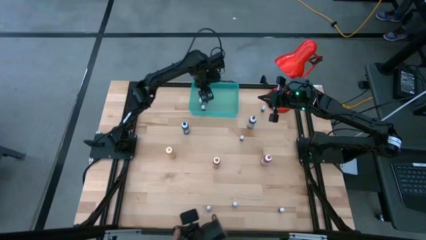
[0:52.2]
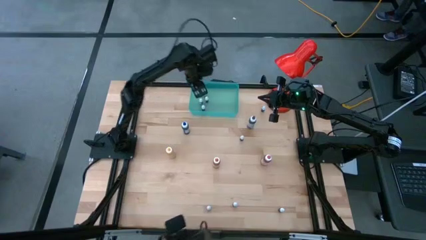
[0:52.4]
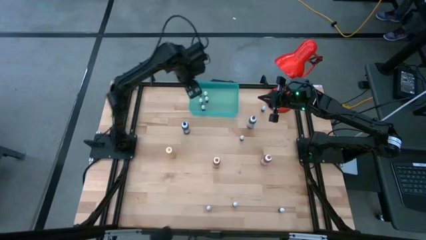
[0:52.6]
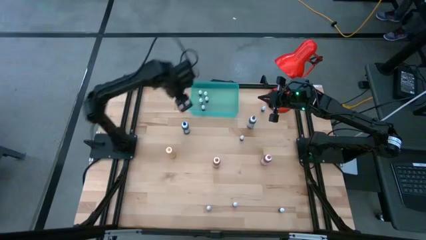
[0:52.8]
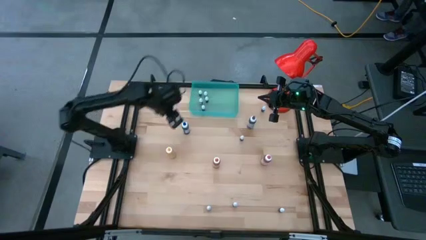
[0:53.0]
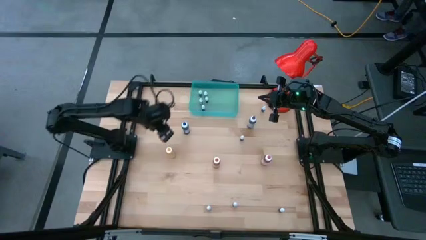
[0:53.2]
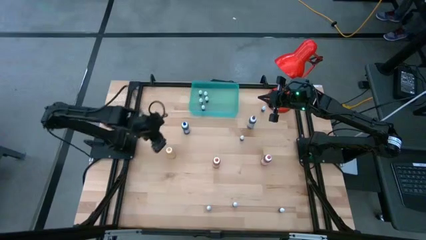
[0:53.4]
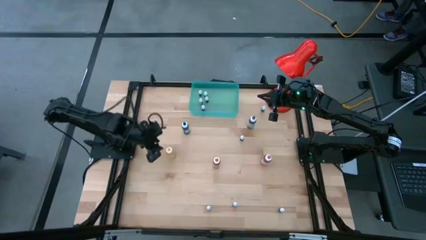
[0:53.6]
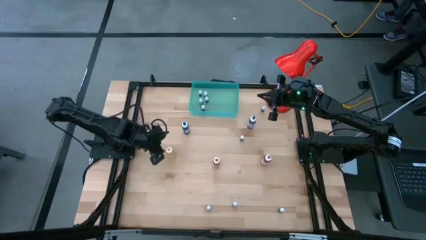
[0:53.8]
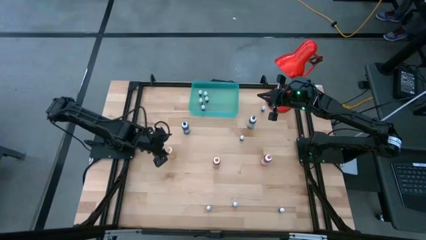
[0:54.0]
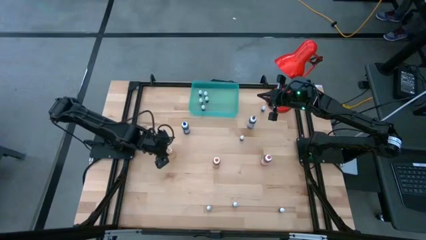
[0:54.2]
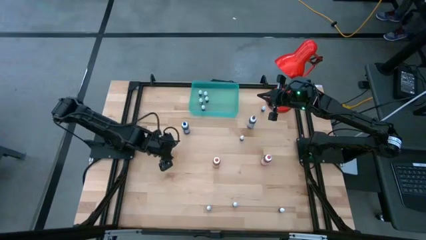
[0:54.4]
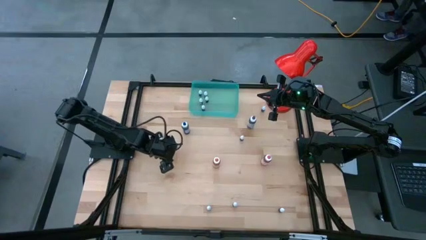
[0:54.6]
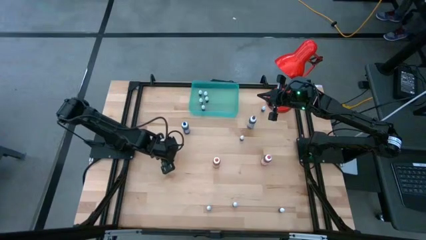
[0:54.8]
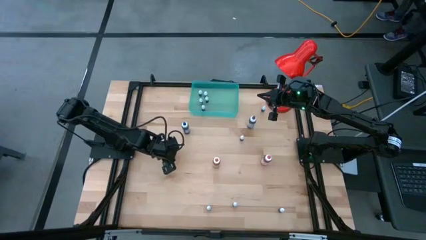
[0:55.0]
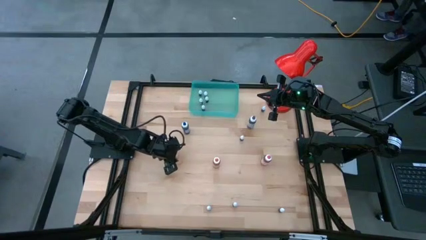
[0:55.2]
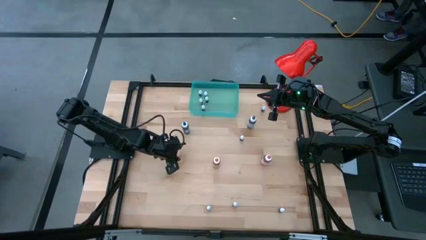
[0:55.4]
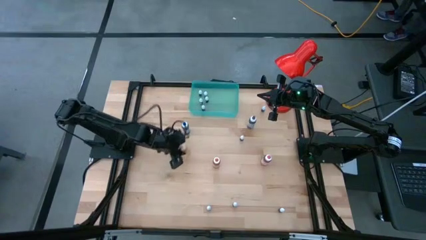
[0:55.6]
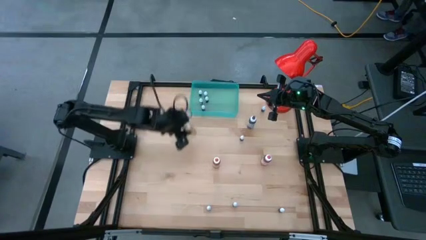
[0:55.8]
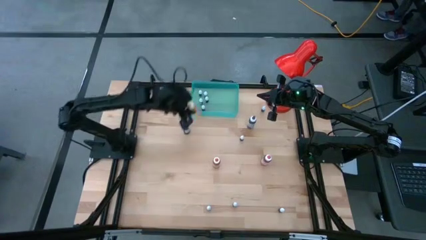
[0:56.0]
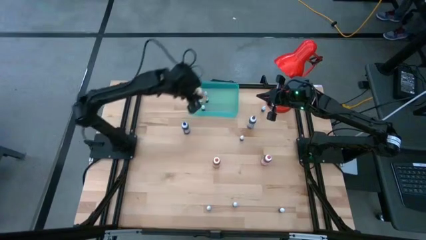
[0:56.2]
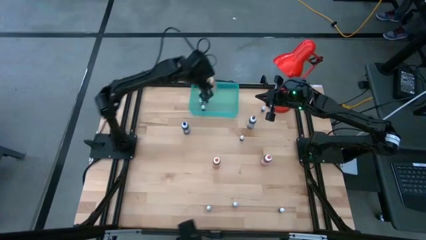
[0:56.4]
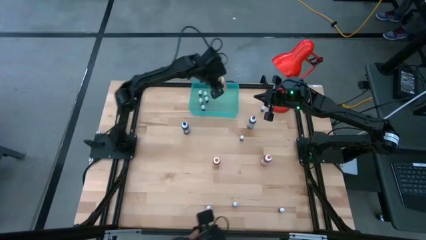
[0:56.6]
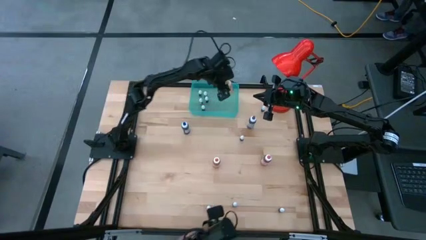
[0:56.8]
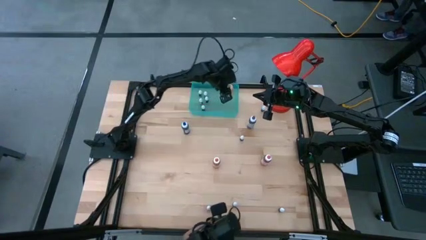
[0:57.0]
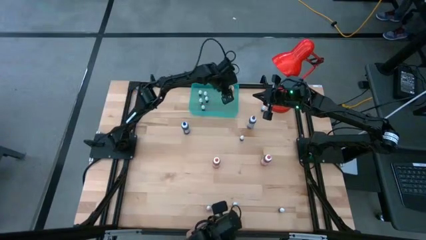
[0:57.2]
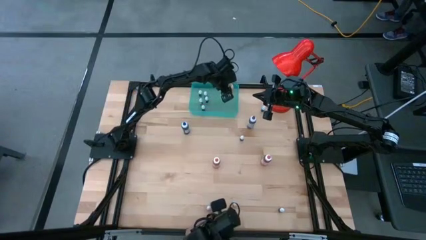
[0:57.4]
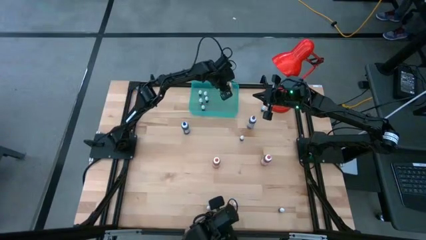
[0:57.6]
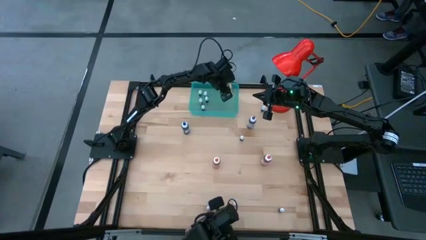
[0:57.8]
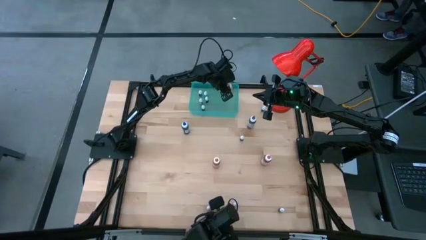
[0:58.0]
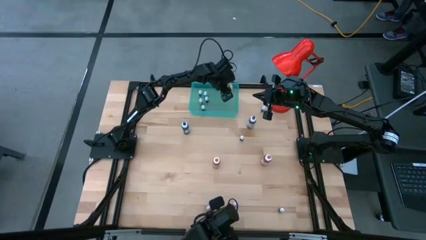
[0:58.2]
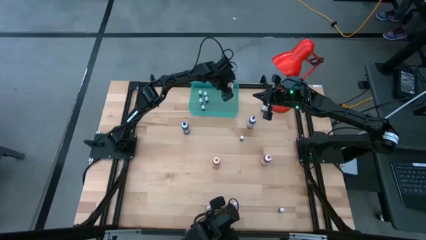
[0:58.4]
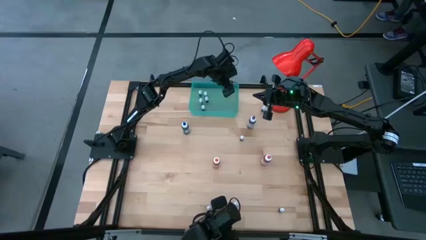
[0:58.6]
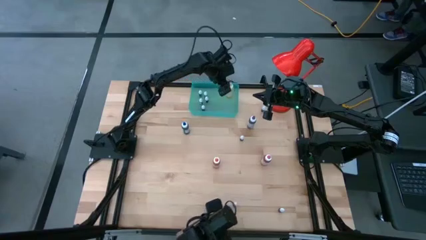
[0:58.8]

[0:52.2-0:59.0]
Task: Pick & Place food coloring
Put the yellow food coloring bottle into the bin

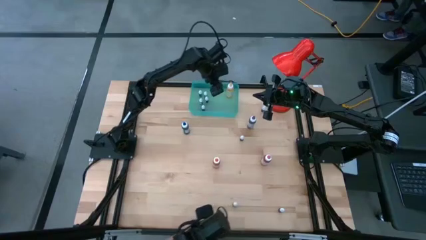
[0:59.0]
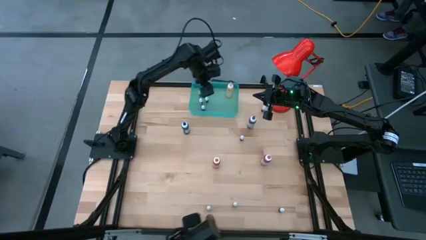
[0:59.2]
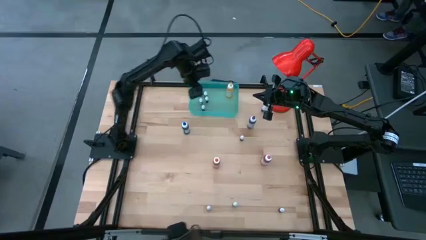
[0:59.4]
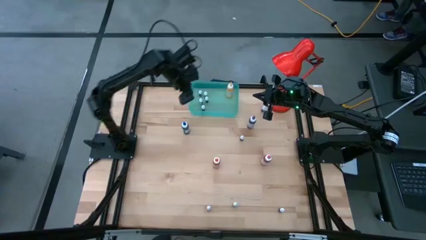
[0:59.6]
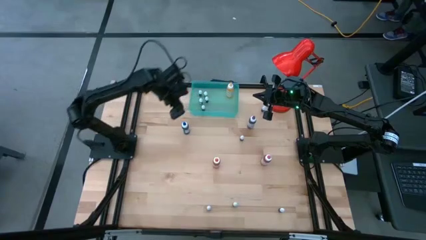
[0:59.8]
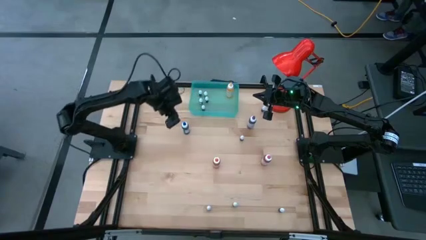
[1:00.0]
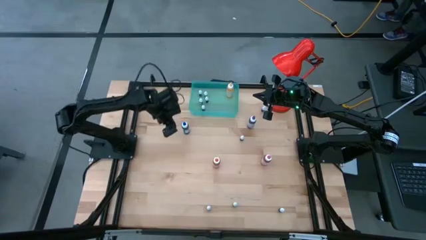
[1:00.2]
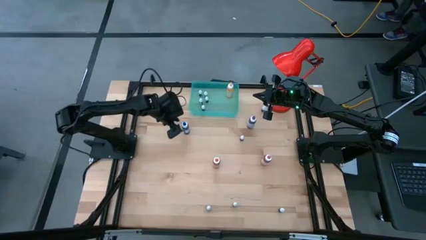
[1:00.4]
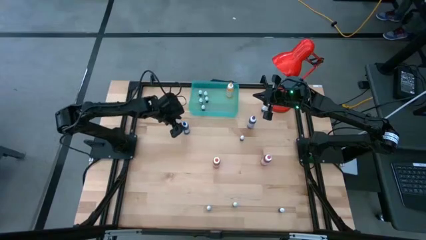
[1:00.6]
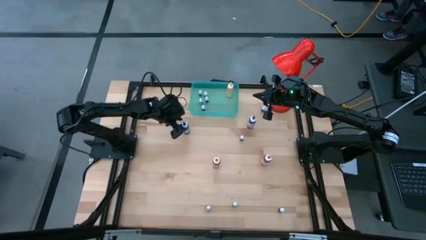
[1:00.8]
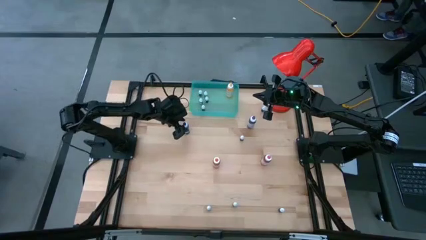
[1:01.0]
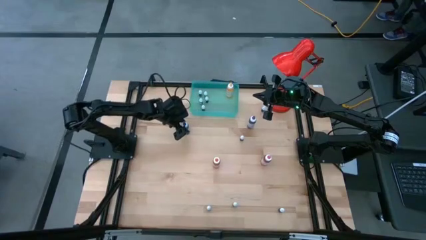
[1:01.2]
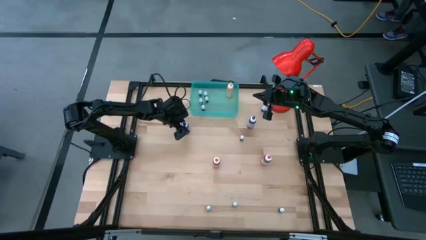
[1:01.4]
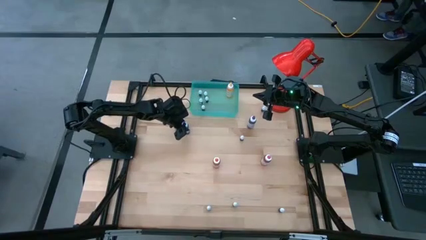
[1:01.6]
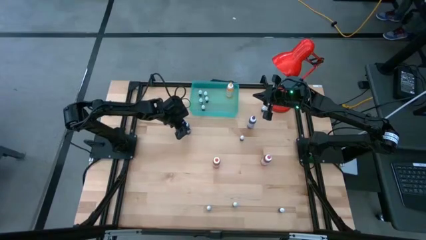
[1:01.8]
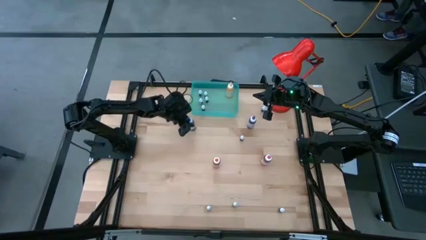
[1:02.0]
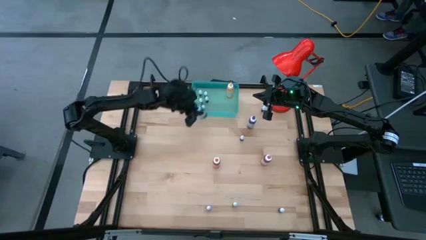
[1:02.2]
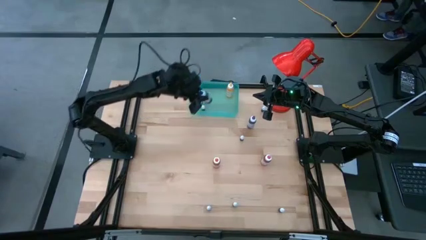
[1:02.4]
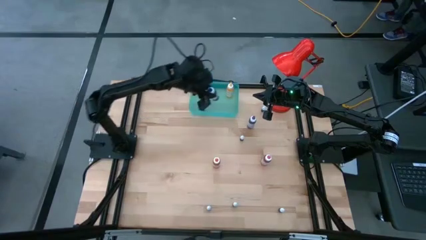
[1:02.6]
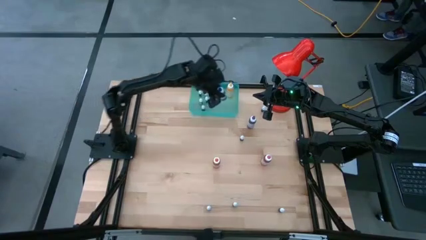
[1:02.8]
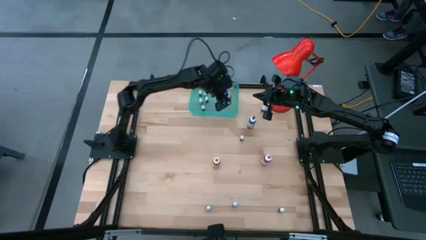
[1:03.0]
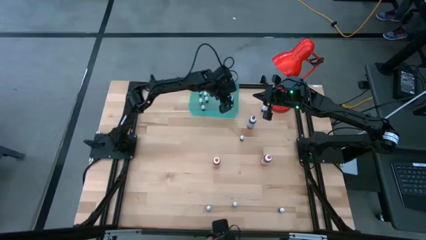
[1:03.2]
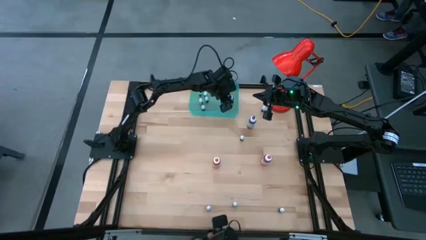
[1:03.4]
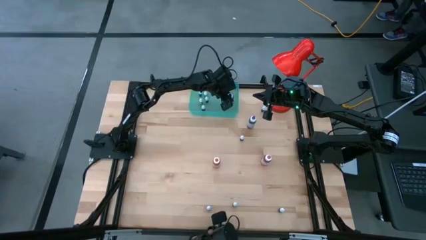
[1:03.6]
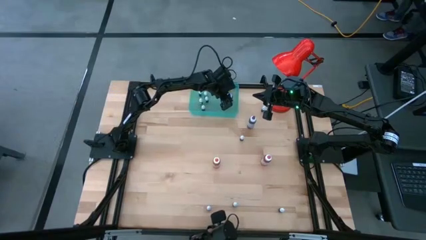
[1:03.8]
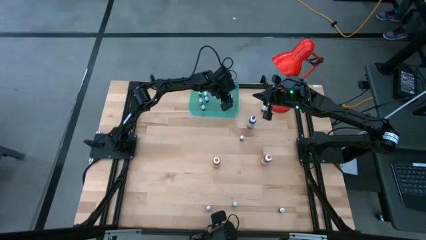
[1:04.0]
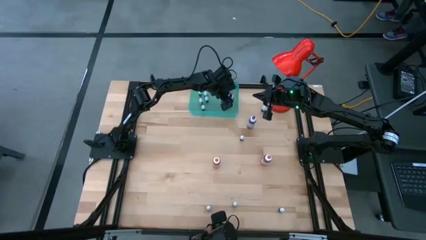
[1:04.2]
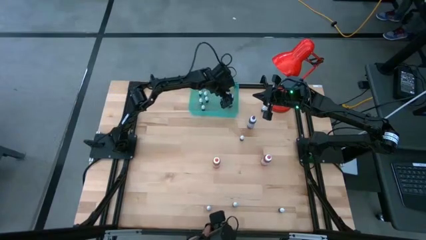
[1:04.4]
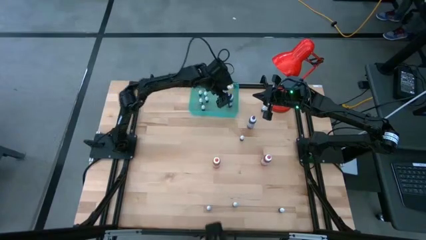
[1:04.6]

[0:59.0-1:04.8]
Put the top left blue food coloring bottle into the bin

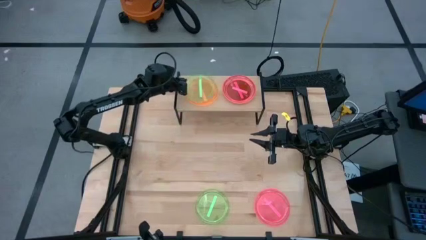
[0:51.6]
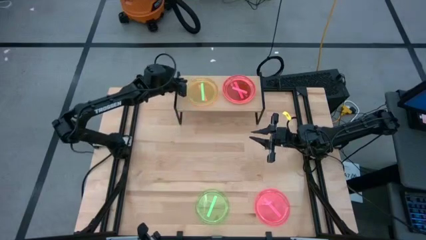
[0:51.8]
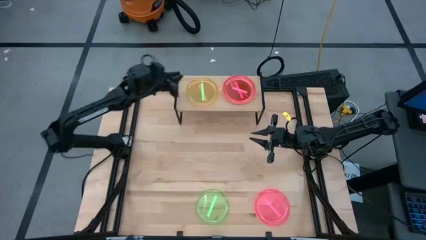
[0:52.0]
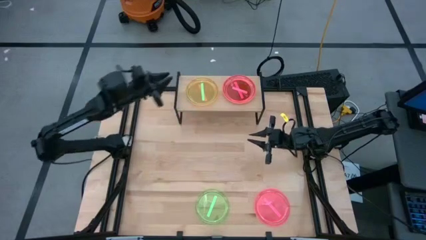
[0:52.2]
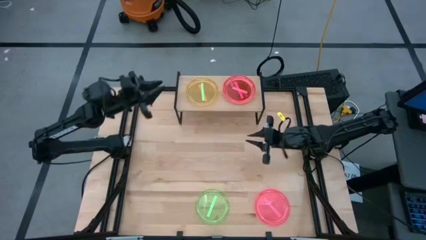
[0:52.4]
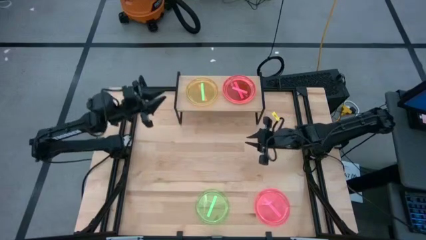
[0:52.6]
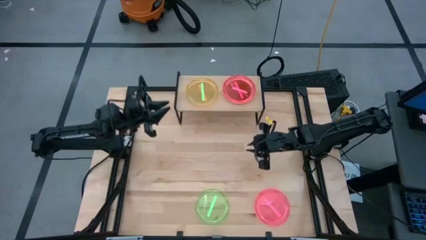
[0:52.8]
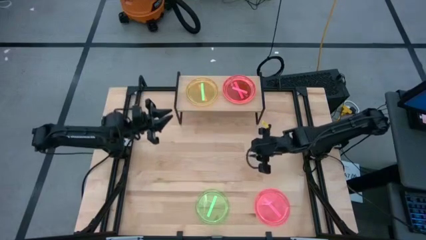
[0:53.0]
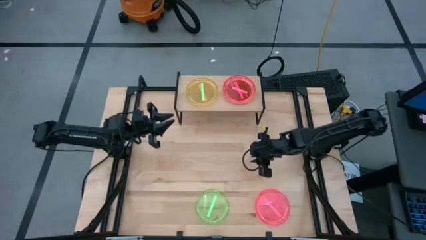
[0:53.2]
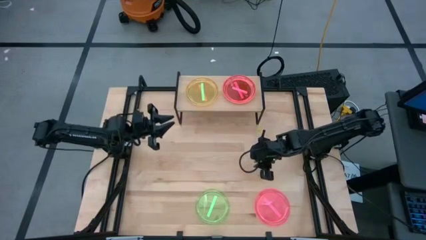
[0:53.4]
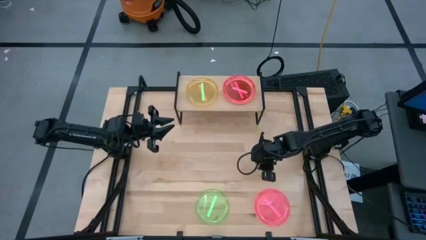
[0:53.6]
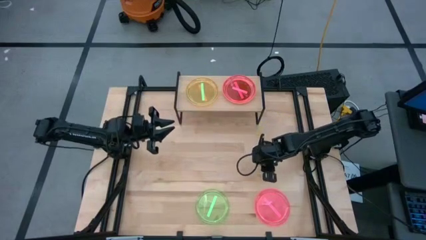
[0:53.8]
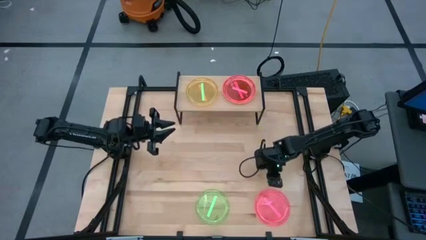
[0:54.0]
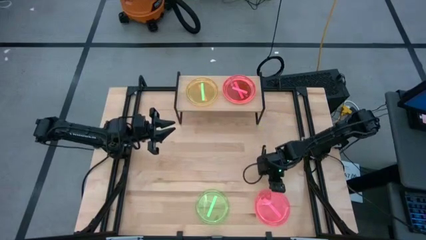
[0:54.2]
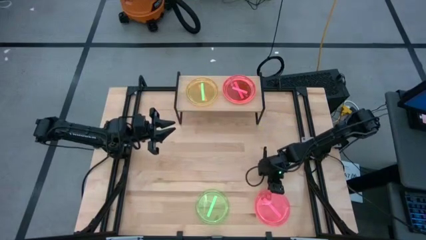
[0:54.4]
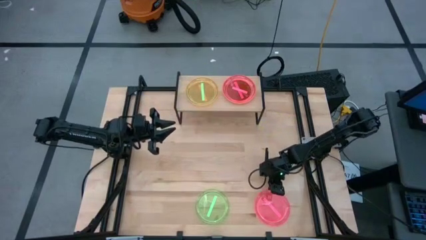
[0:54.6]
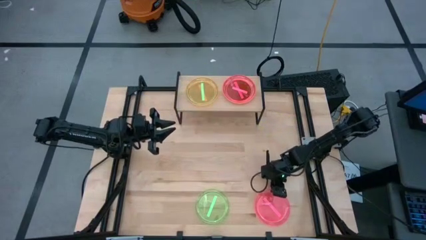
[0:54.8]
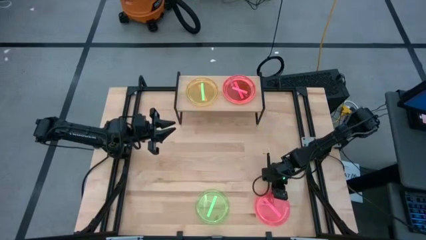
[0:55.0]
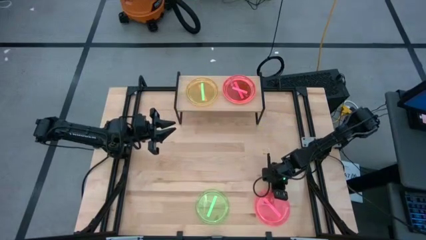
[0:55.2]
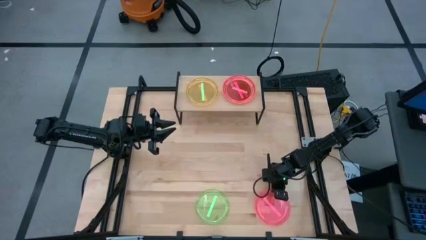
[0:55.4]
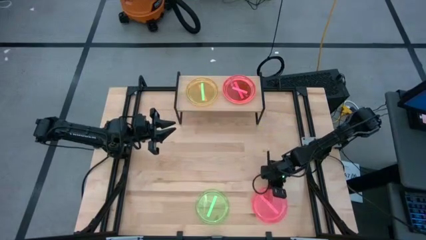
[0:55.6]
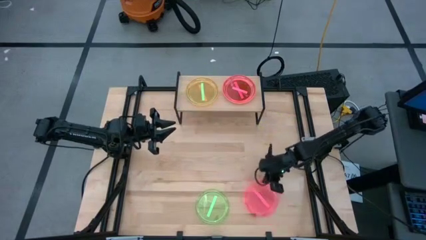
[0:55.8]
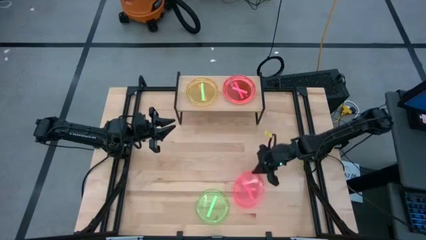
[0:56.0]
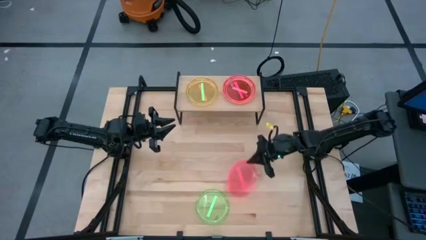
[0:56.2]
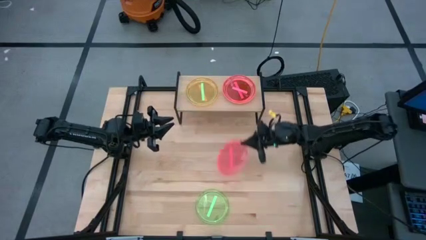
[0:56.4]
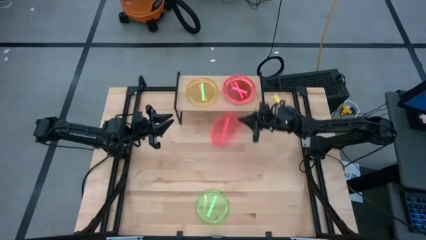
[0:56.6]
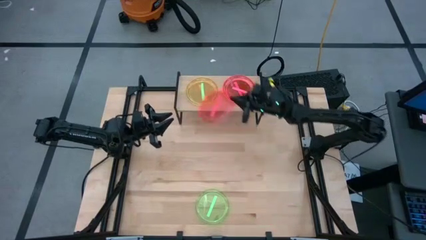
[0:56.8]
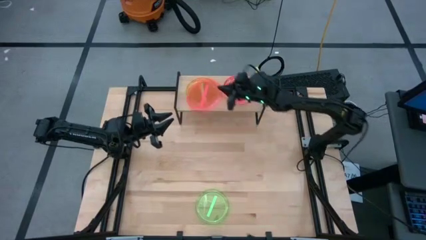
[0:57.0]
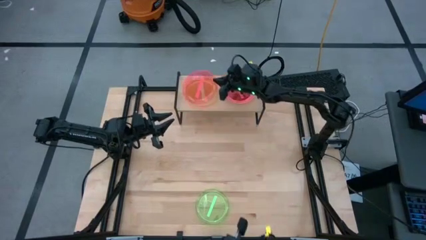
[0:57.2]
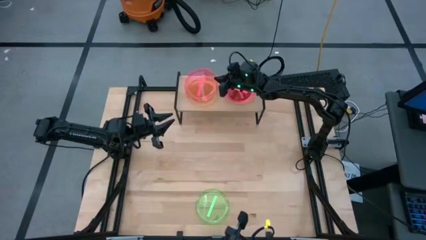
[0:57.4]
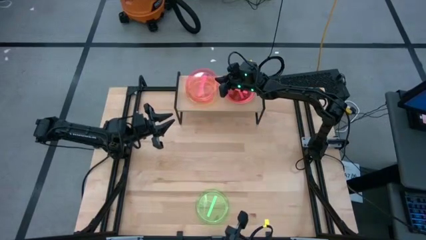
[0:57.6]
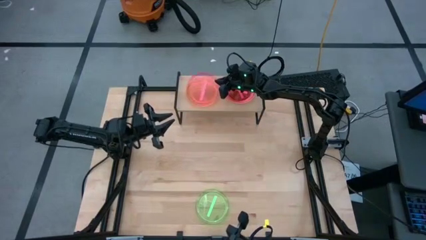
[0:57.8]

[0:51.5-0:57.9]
Task: Place and stack plates onto a shelf
Stack the pink plate on top of the green plate on the shelf
